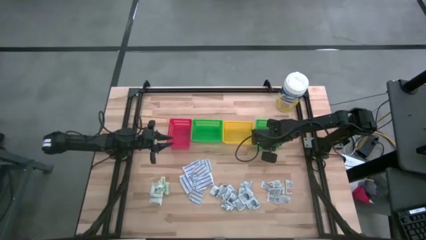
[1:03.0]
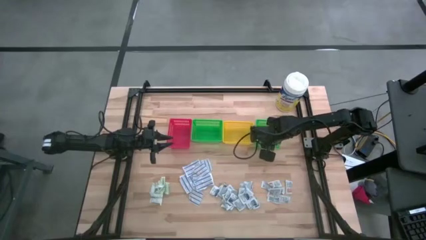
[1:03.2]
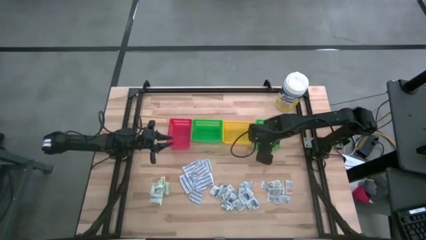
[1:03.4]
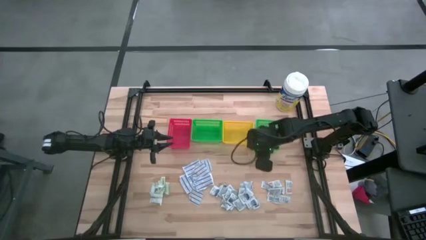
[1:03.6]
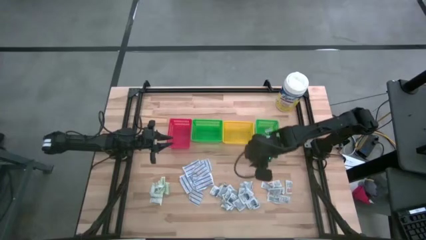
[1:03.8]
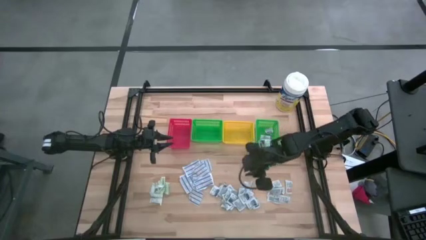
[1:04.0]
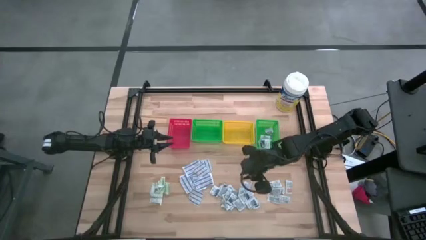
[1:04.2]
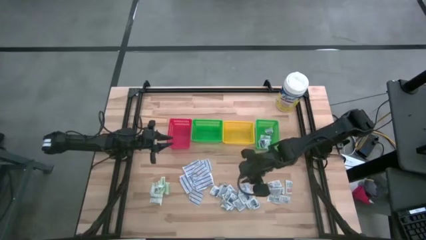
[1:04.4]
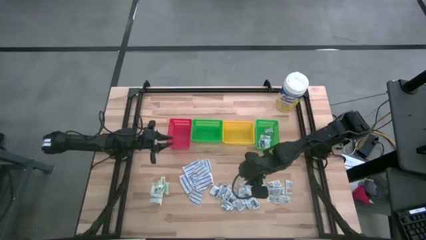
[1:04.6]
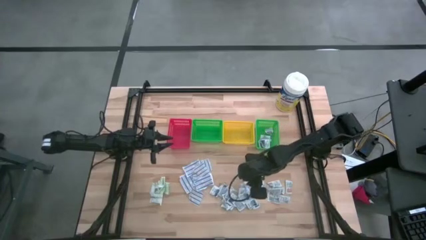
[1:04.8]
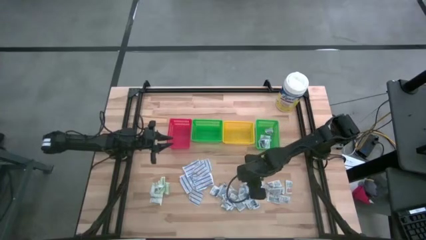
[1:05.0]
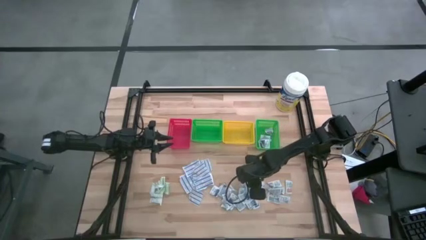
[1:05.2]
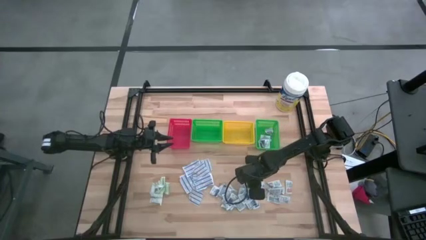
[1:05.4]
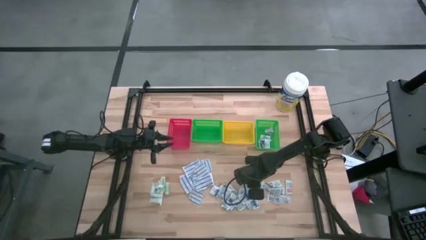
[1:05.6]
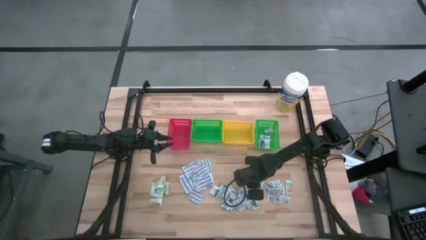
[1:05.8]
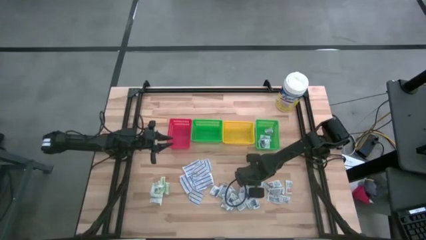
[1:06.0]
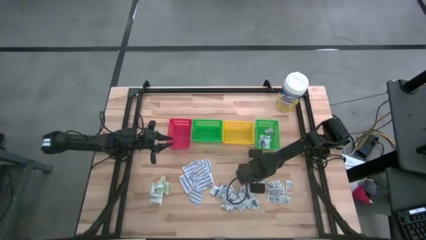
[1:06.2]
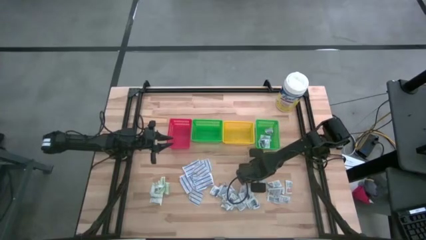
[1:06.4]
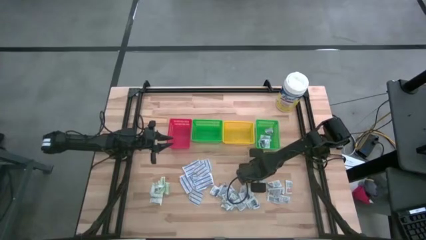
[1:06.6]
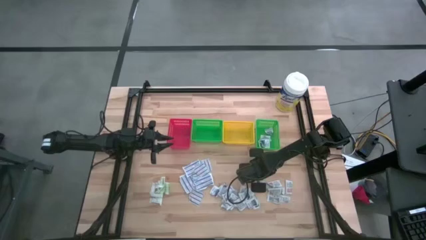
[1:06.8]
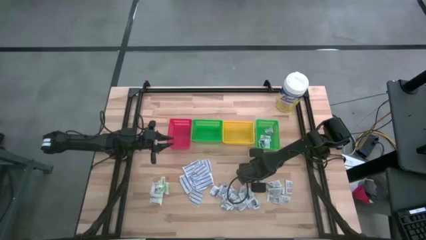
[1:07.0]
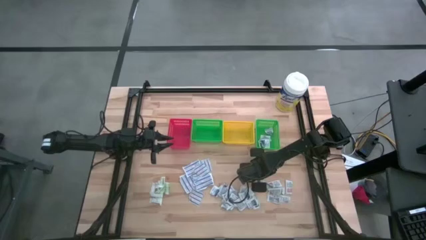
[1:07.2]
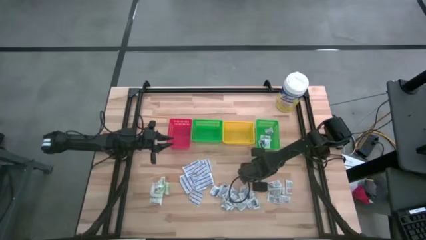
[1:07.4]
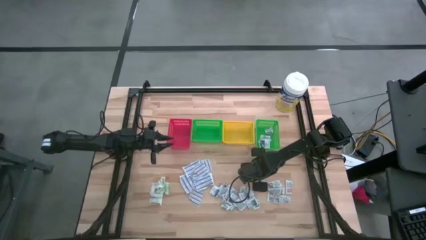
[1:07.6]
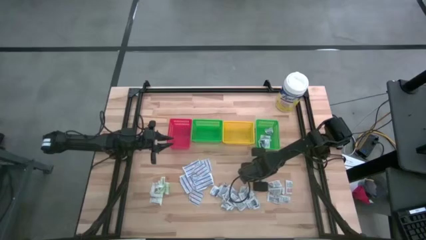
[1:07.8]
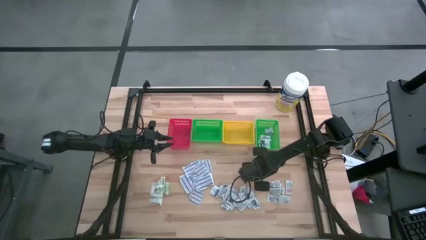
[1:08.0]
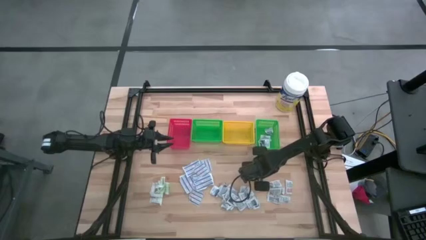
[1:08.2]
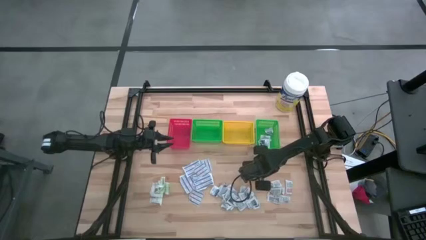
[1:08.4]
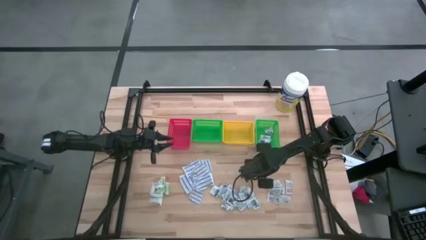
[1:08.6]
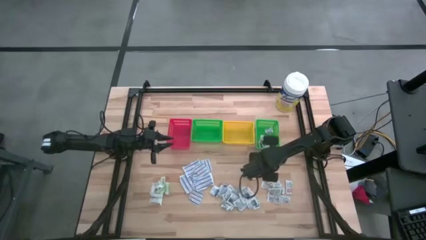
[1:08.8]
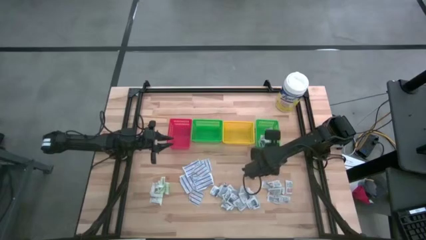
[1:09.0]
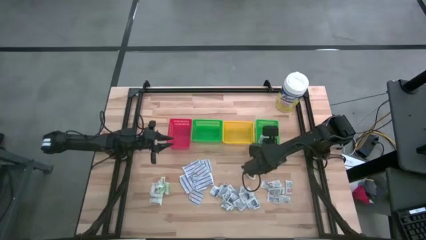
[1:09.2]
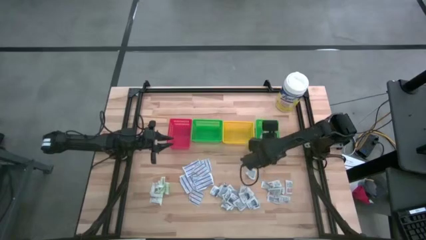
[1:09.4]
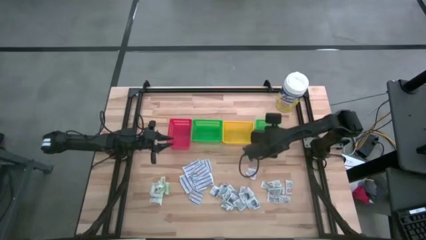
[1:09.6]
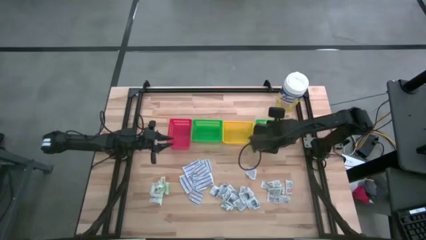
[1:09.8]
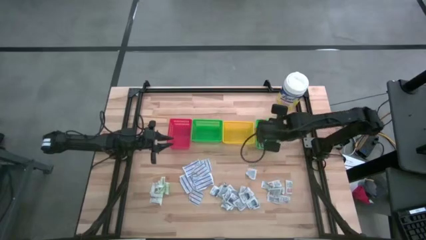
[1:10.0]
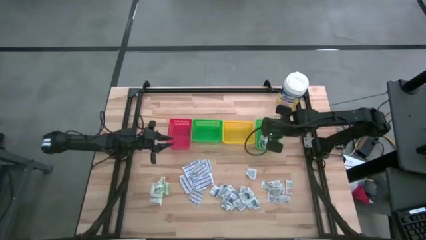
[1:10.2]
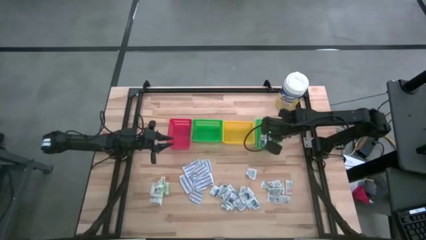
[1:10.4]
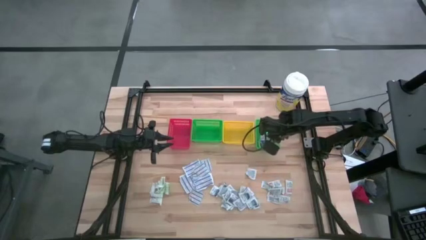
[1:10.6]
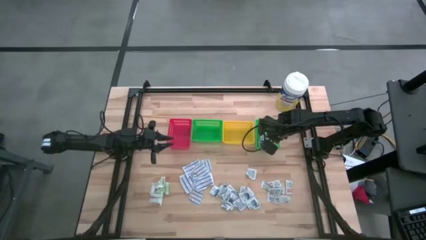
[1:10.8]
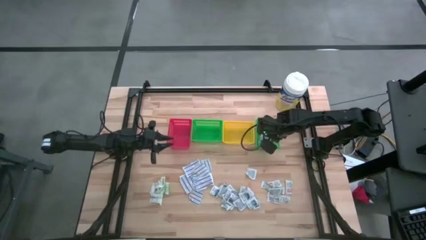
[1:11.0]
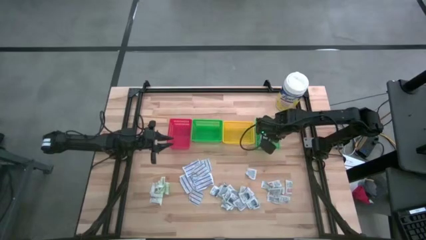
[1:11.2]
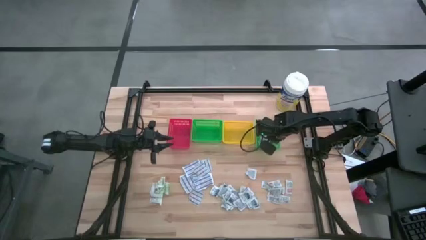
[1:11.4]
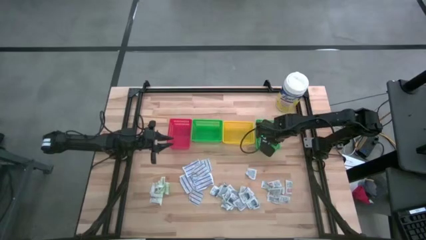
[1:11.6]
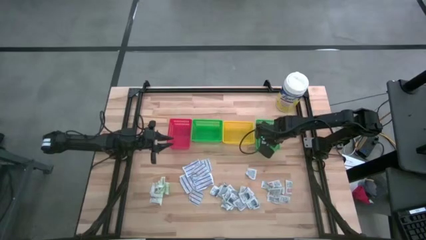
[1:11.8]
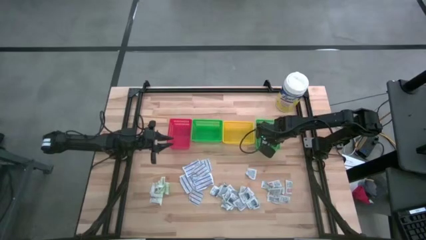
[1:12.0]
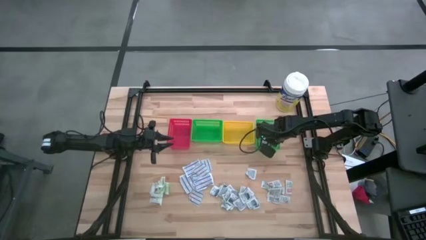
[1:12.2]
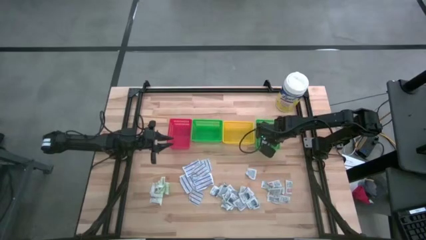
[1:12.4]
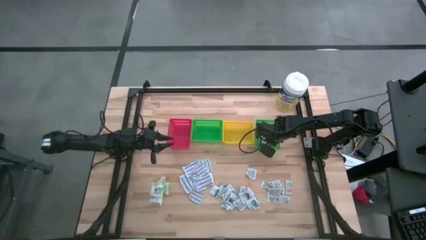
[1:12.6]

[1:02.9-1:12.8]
Task: Pick & Place First Aid Supplies
Put the blue alcohol pad into the right green bin

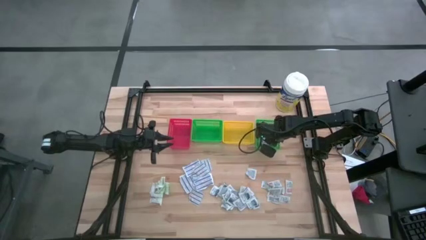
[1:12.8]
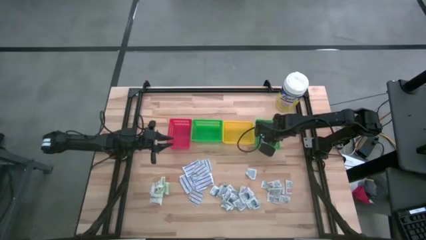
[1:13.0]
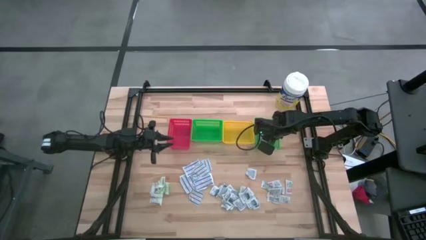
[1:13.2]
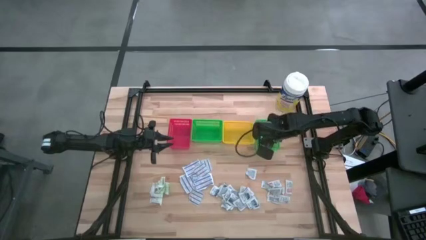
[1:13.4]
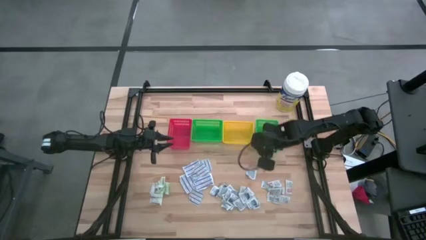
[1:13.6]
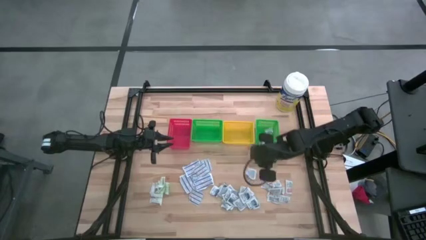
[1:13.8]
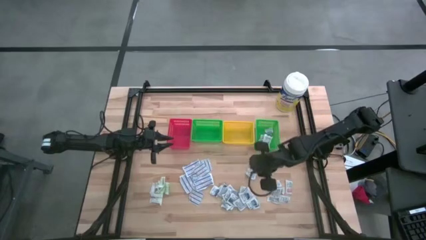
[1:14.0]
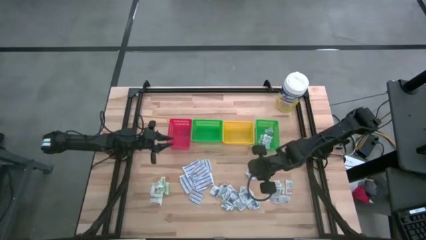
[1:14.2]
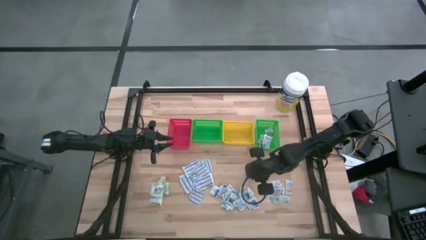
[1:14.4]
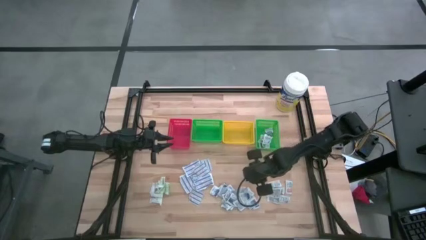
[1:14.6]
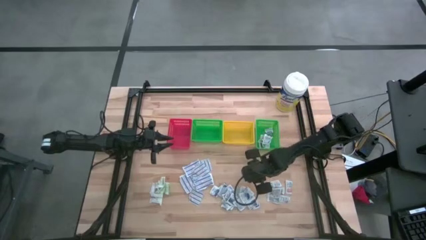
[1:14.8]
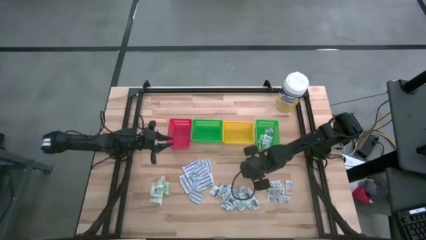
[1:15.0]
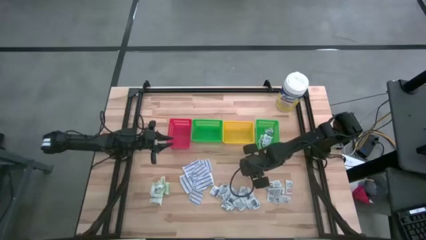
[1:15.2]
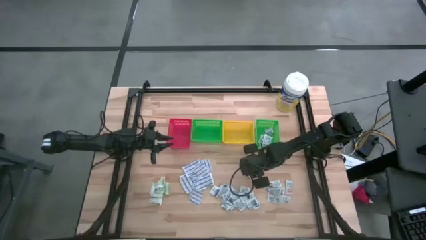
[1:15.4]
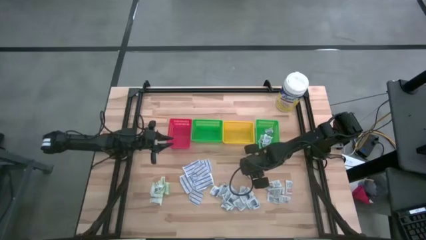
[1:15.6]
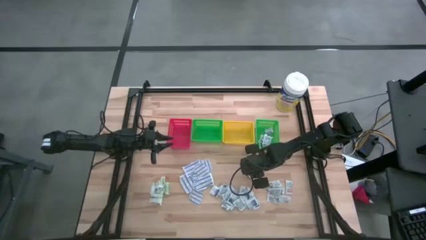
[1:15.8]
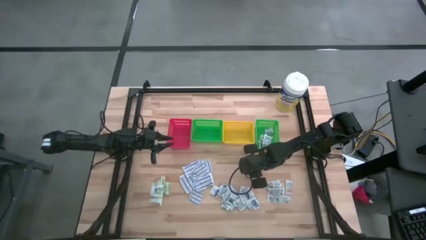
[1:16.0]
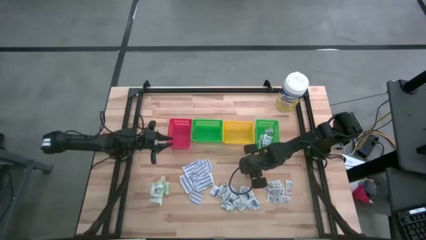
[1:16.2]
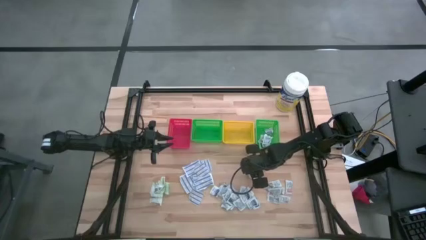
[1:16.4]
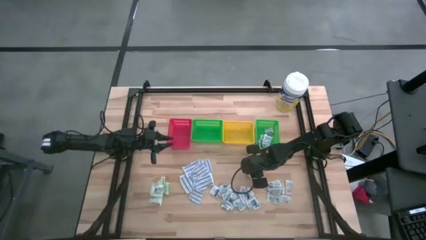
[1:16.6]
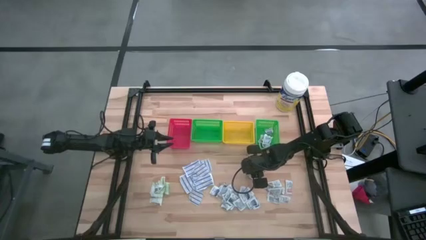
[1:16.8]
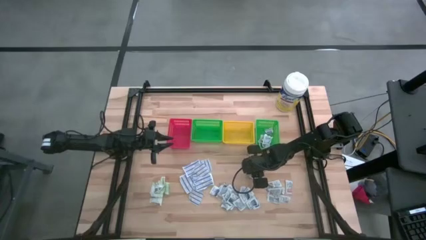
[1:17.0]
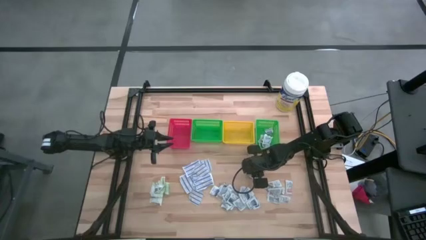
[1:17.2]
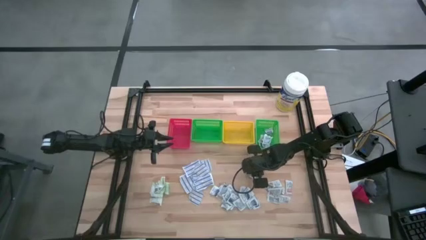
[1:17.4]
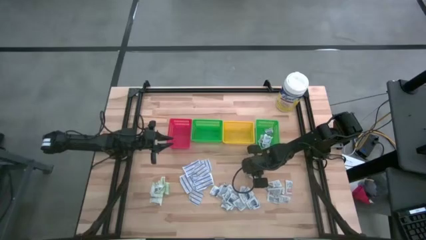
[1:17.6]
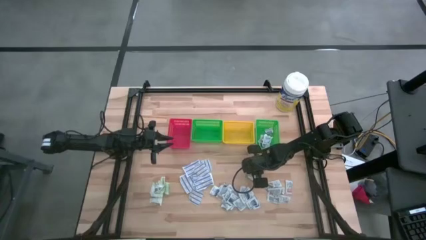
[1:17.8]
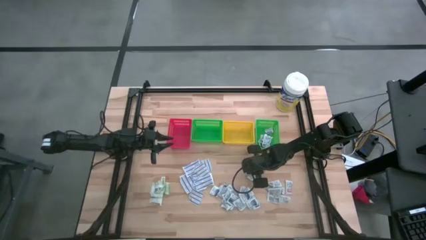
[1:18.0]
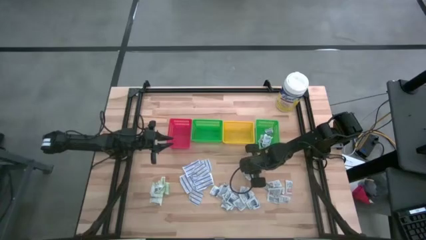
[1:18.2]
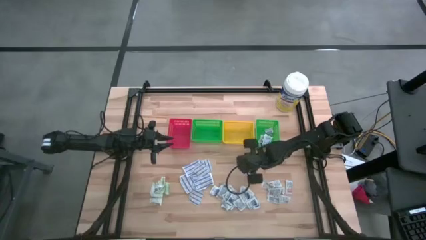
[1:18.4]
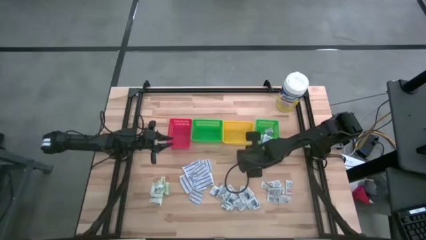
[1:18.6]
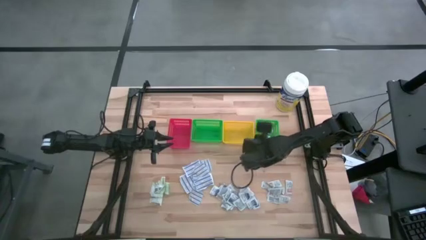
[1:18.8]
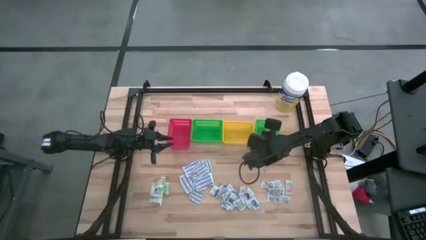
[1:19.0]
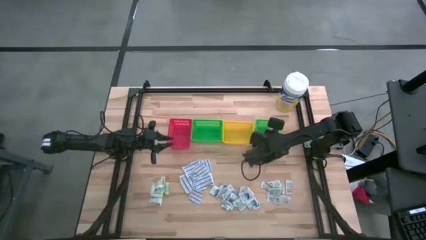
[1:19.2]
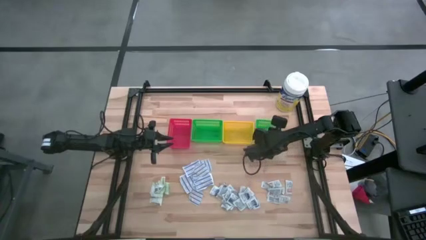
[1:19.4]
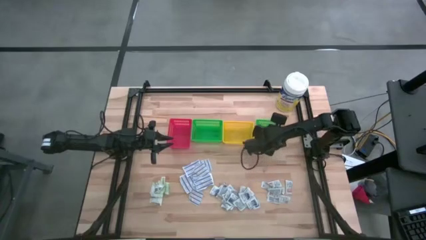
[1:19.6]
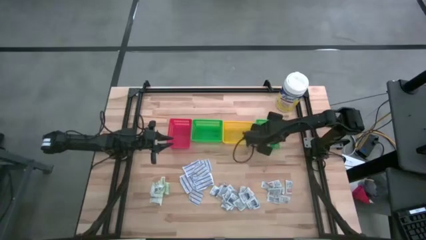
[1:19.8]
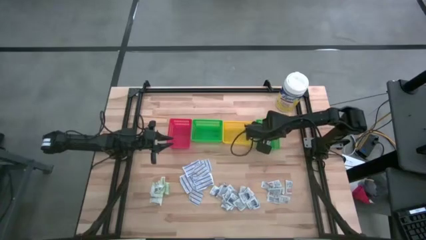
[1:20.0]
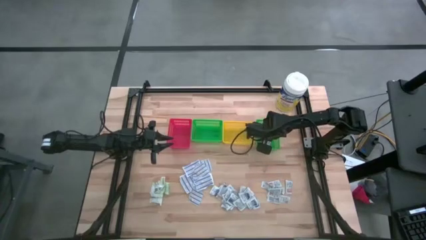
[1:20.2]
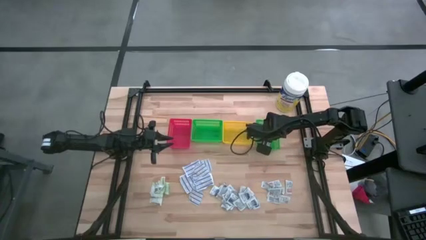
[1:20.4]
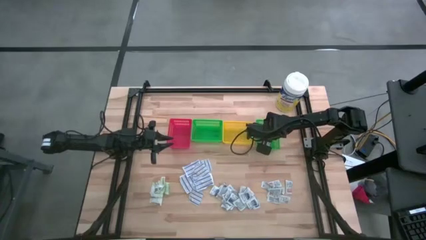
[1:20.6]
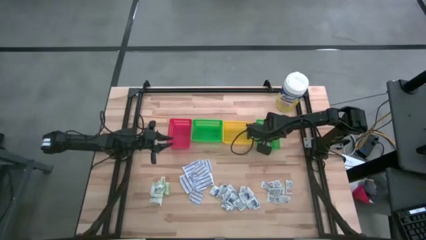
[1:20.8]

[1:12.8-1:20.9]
Put the blue alcohol pad into the right green bin
